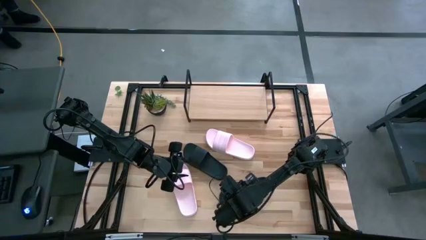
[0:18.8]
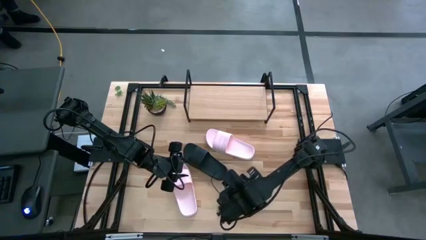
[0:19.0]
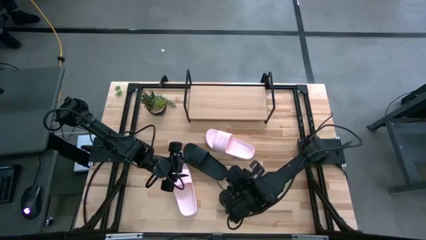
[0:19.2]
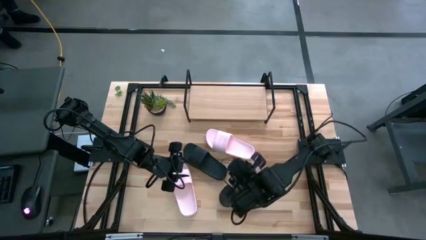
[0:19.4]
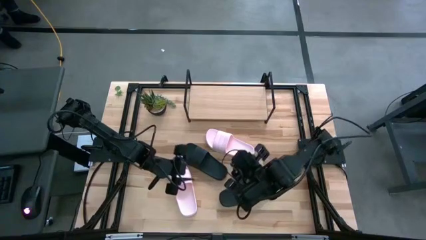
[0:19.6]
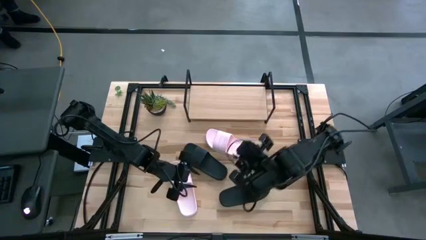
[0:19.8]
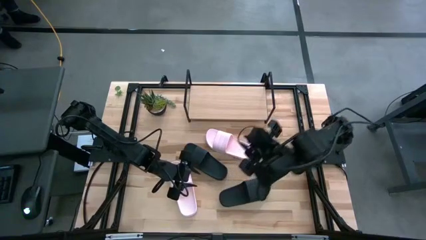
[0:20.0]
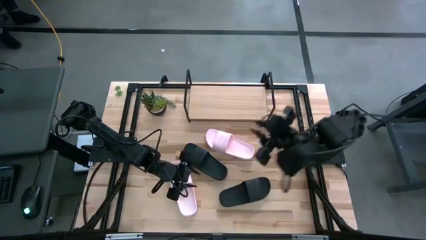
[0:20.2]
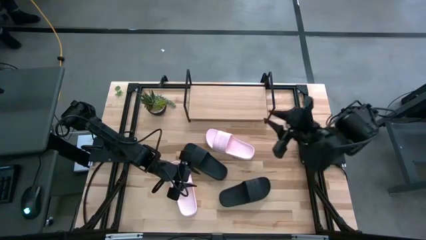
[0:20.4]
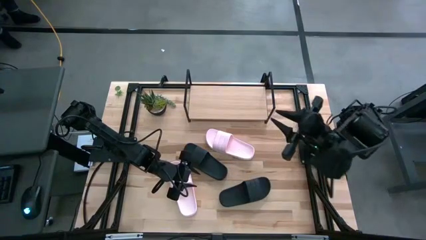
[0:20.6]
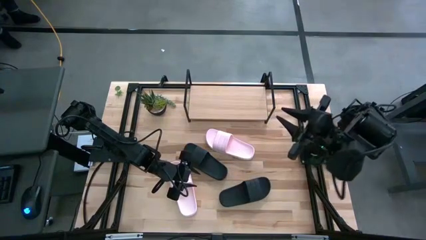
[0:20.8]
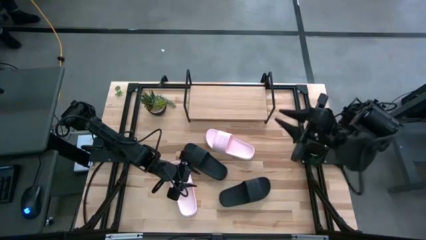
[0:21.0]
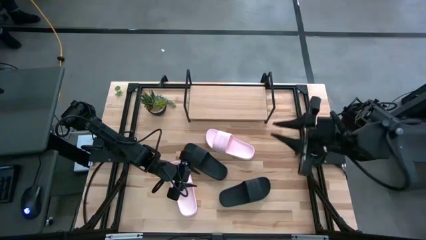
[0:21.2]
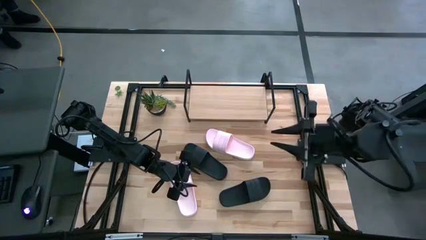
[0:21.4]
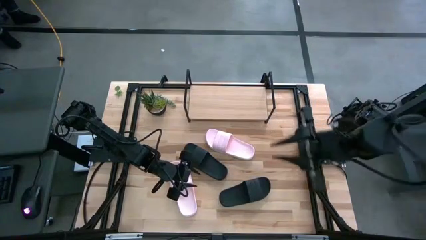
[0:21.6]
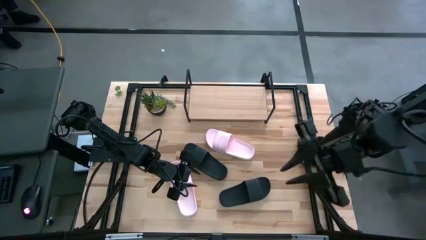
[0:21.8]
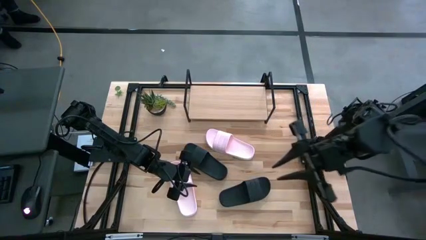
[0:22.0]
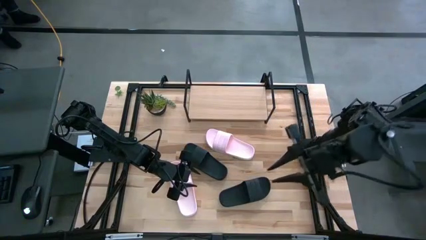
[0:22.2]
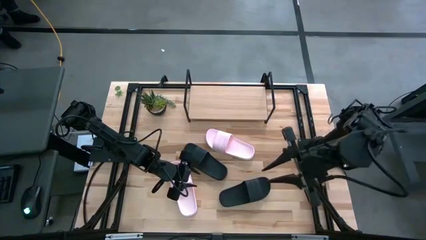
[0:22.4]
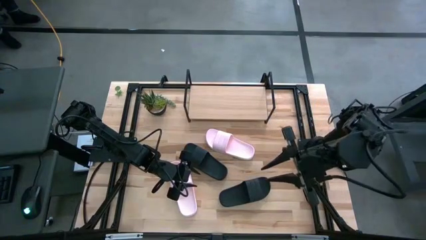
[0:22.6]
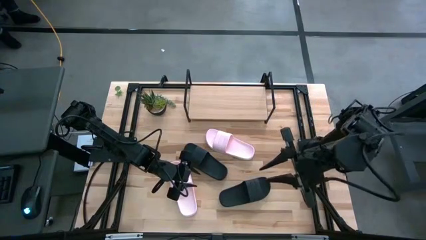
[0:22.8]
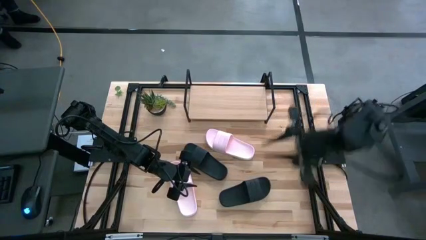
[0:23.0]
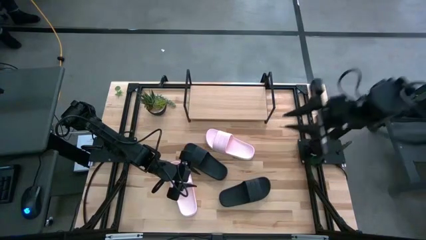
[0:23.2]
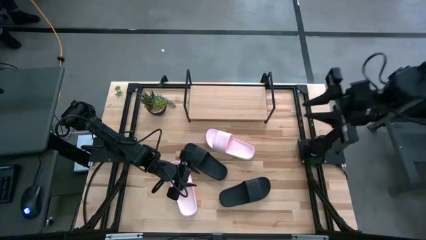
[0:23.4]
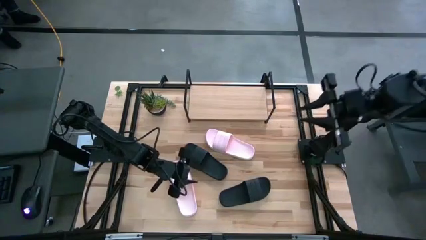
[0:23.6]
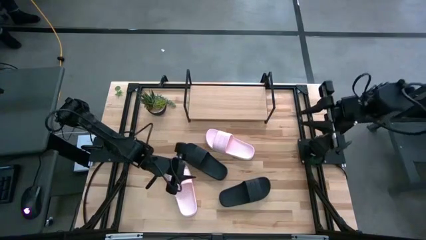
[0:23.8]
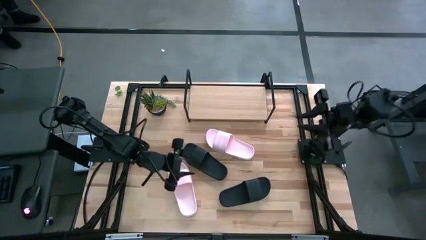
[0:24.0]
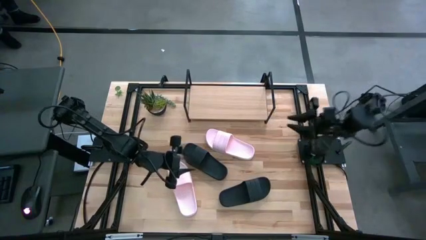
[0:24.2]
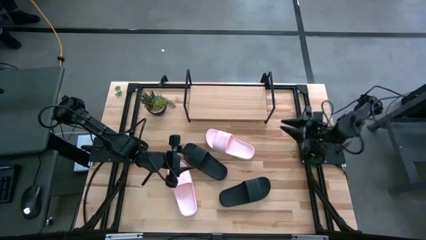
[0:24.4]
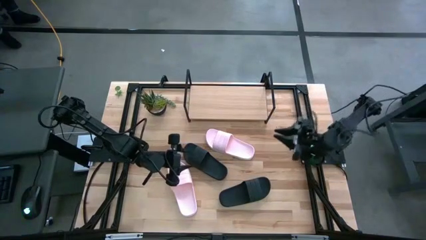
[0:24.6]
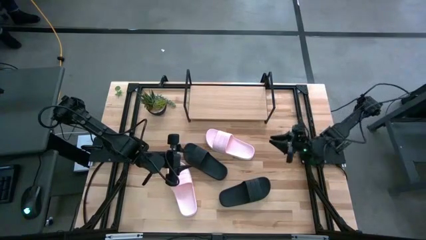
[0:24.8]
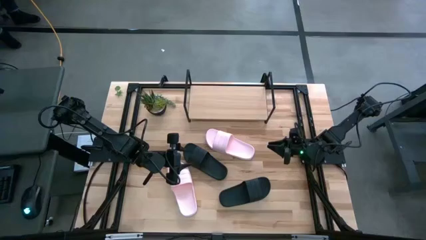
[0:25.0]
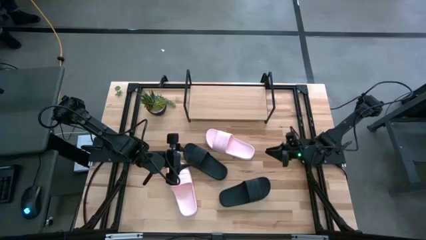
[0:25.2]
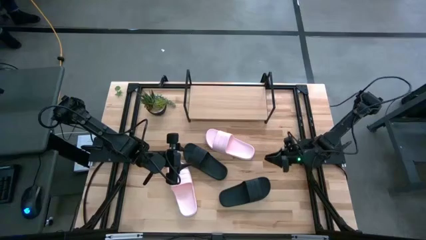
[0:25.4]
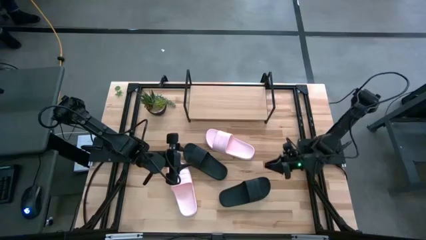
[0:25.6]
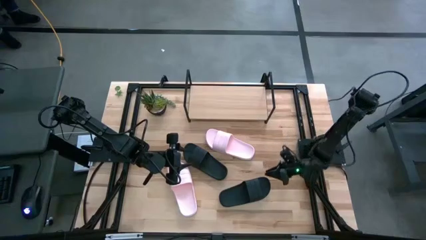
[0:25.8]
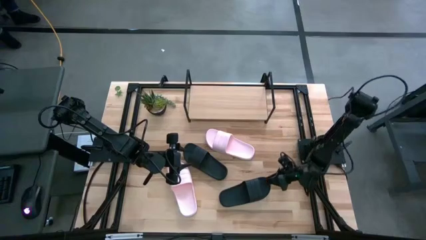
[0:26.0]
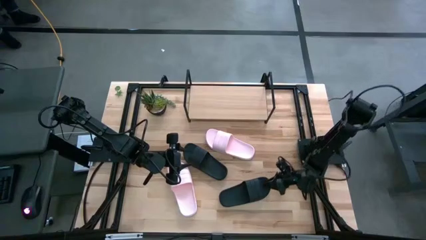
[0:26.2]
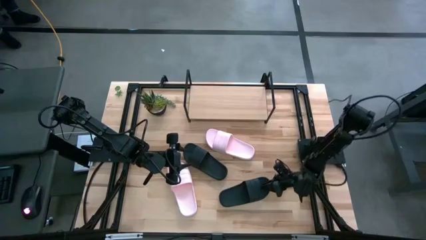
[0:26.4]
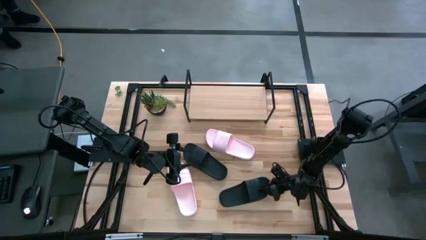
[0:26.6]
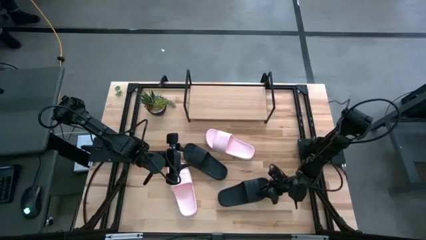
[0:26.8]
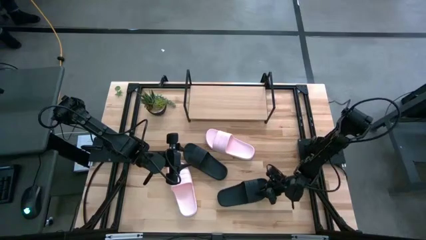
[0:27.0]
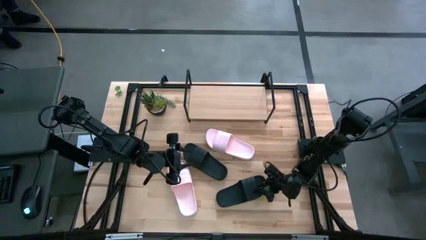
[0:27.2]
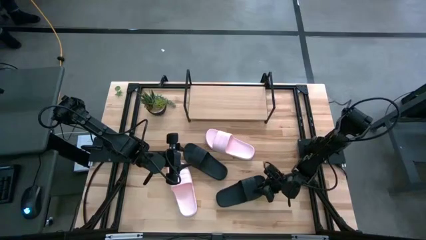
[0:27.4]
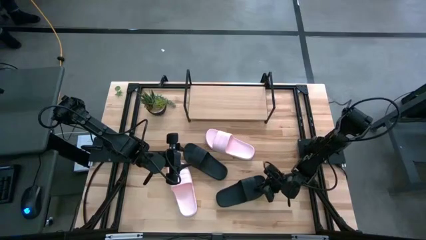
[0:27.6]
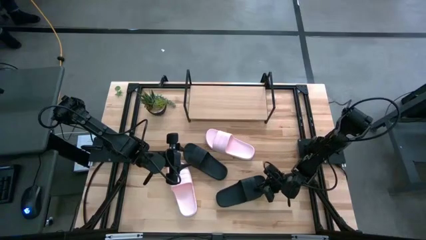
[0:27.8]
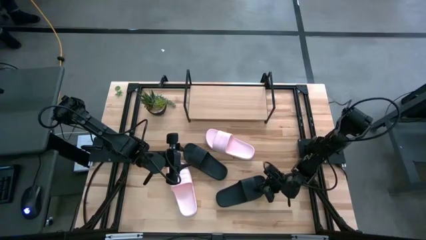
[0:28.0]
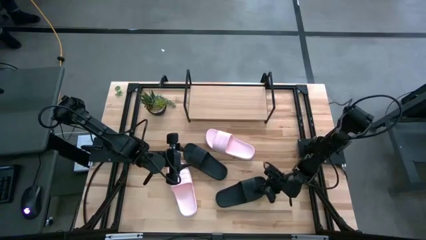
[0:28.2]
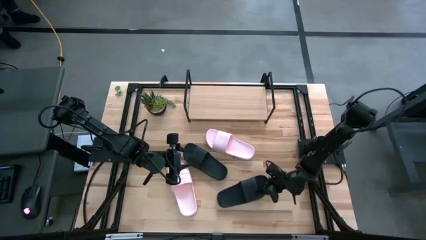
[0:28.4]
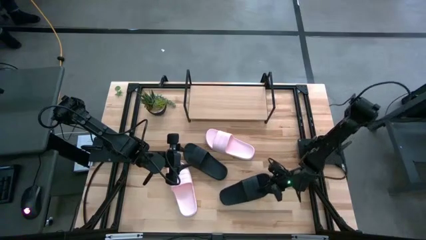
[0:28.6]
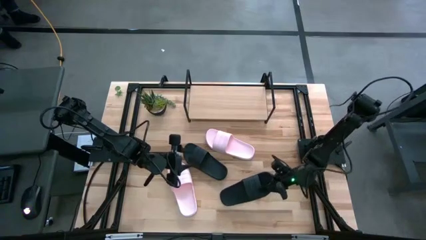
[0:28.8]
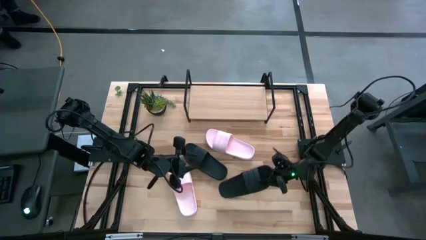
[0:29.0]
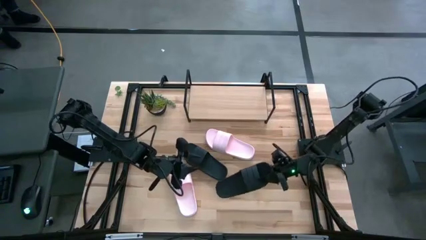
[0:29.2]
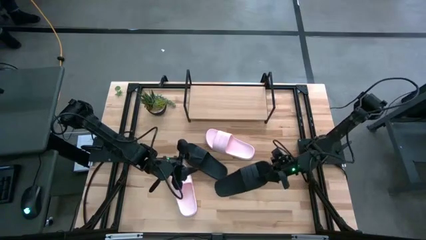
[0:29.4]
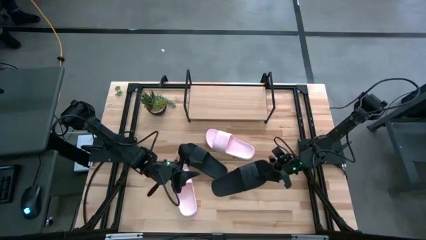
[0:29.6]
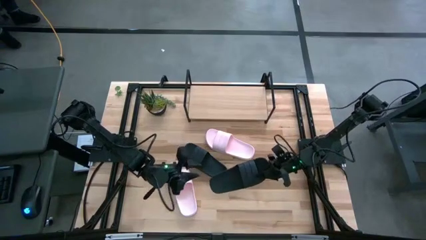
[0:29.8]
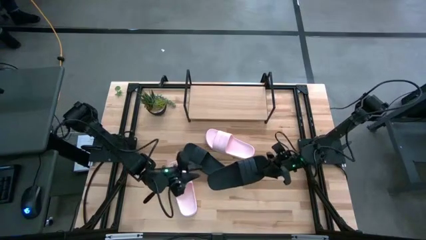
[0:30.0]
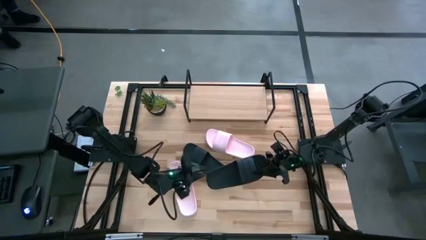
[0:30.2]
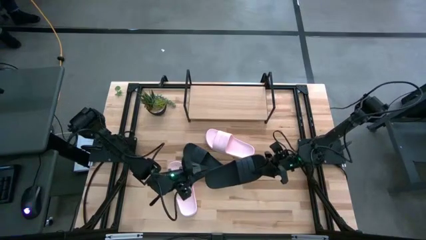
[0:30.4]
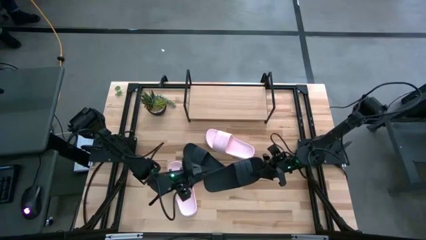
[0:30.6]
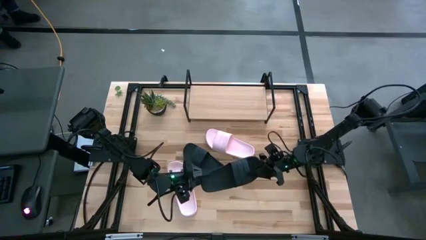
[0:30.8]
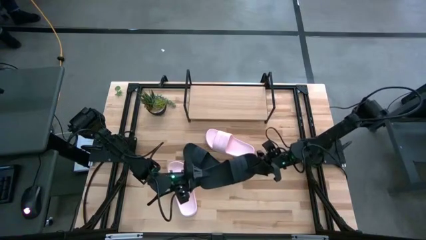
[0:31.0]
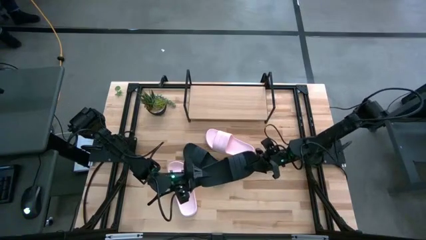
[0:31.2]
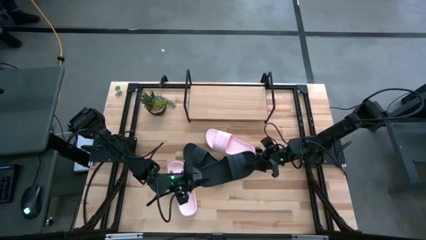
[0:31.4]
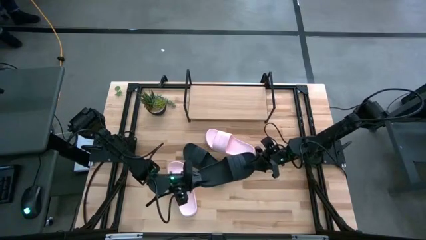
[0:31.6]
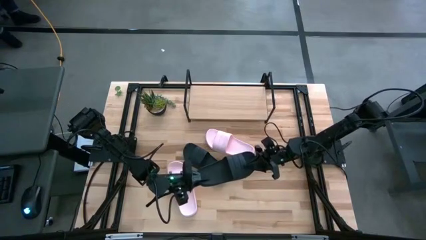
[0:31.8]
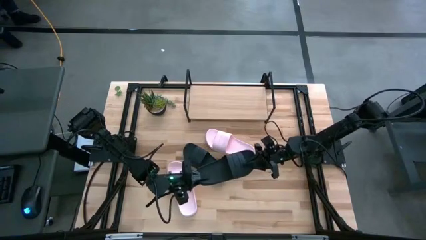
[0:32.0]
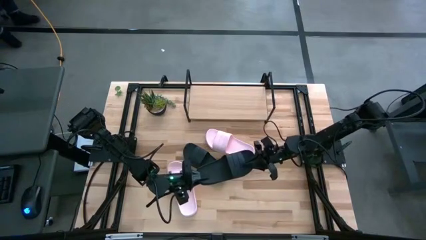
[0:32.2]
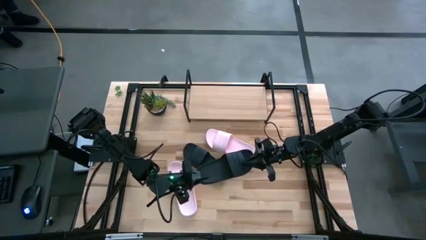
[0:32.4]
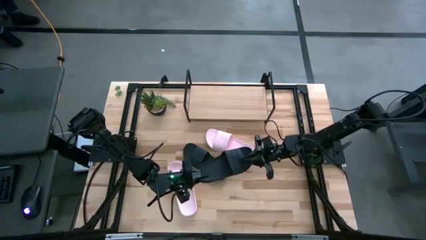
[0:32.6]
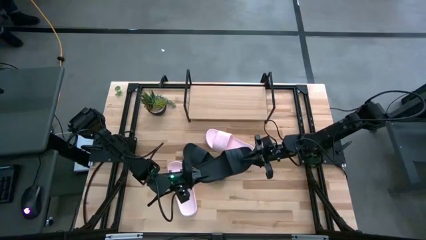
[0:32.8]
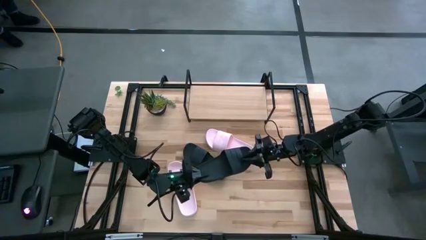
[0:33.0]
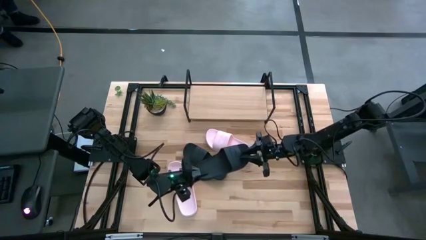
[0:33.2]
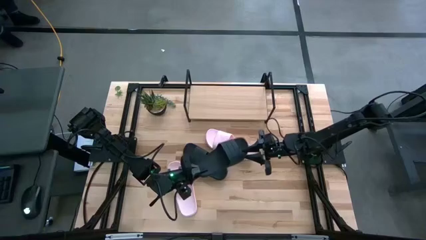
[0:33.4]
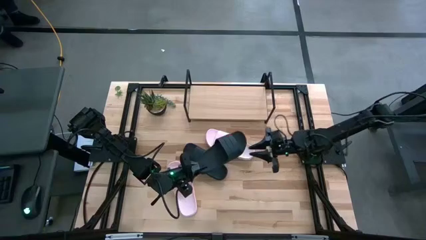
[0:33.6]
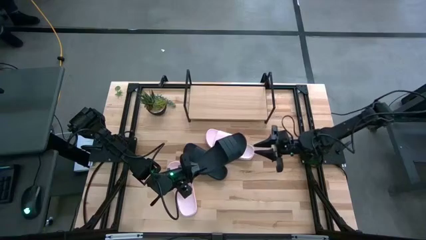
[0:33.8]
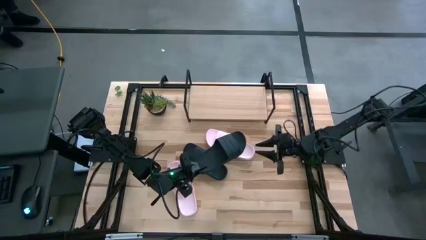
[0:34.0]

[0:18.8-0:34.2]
Task: Pick and place slides into the shelf
Put the bottom black slide on the shelf
